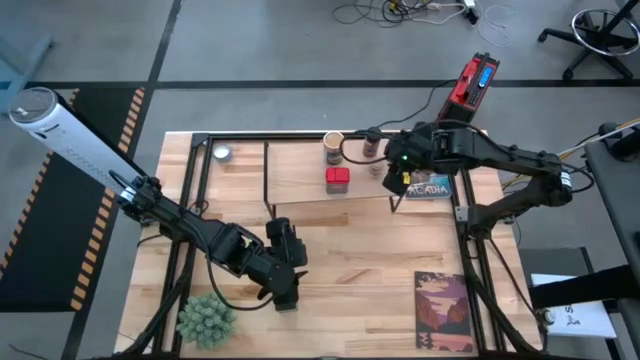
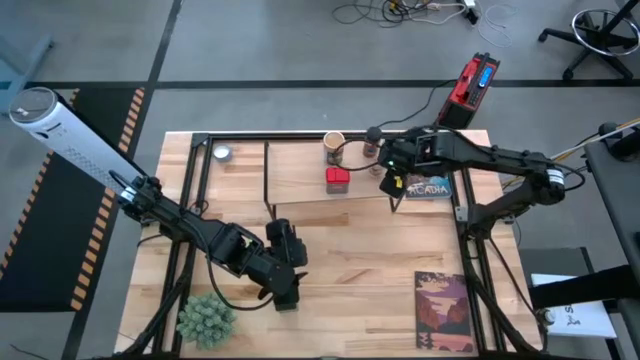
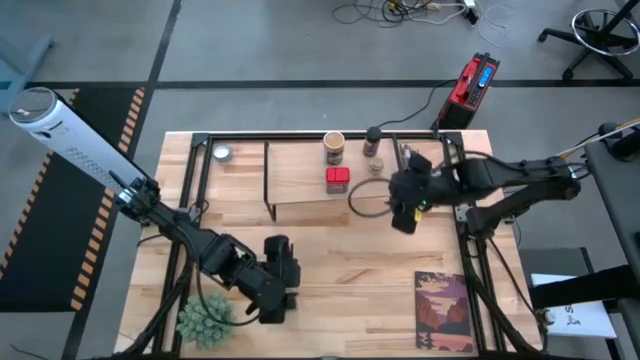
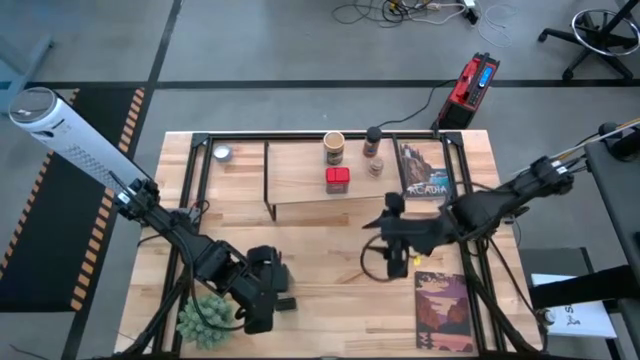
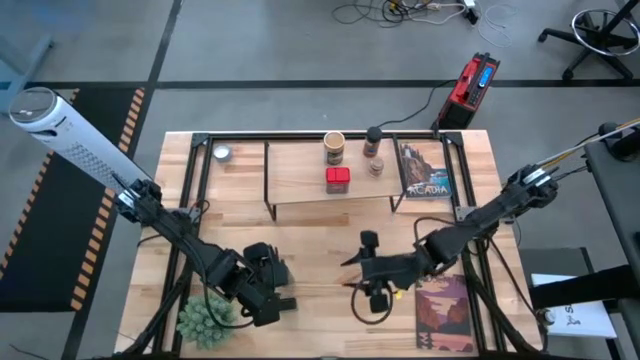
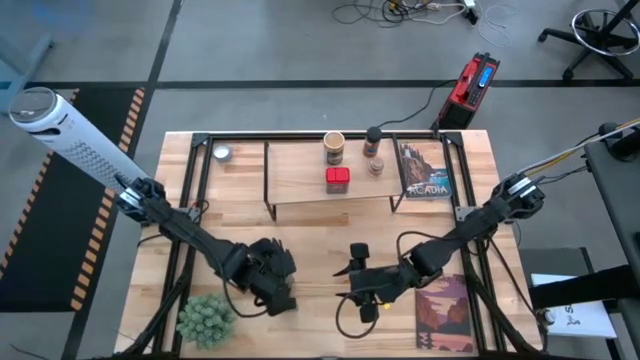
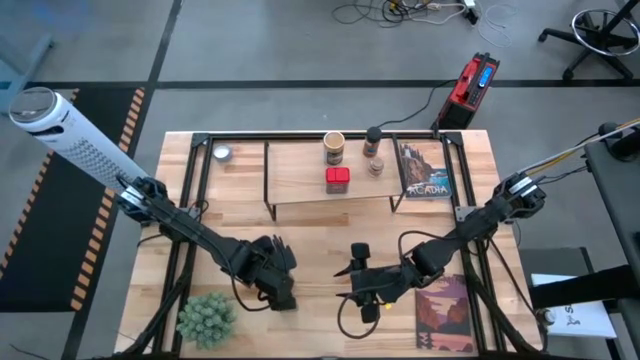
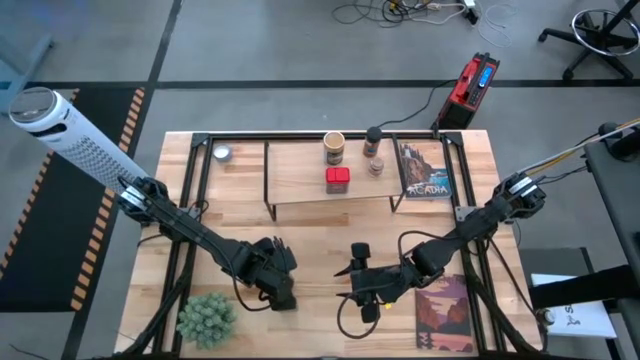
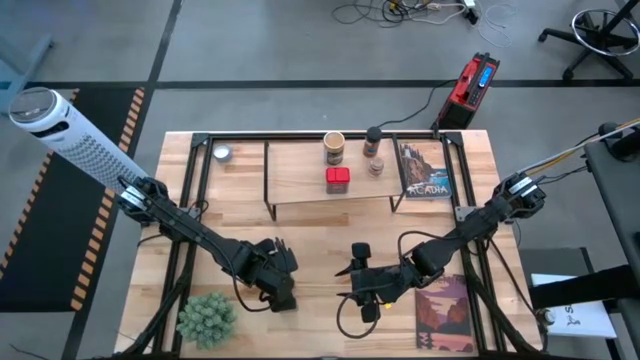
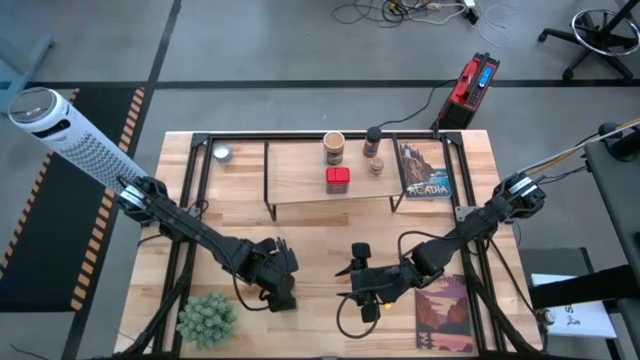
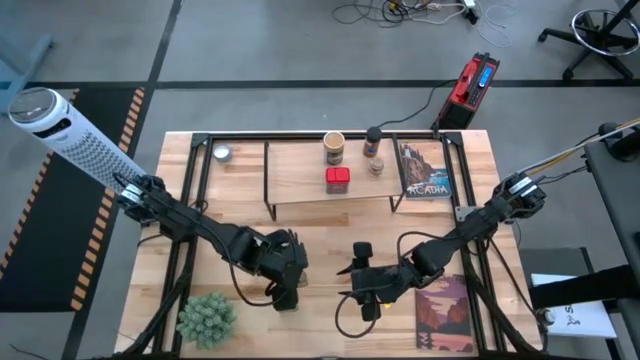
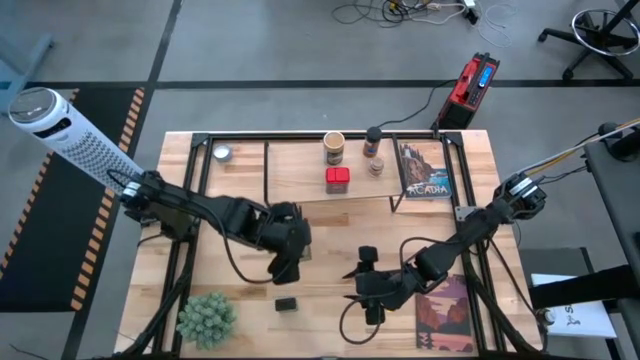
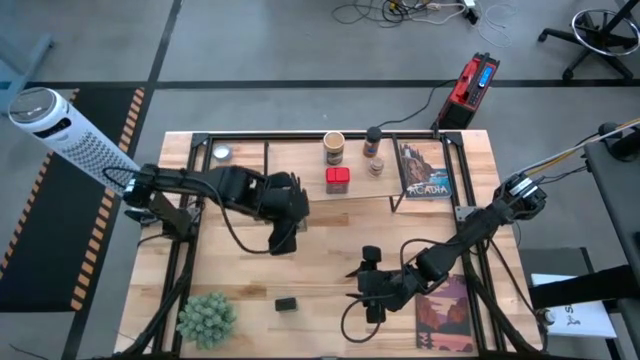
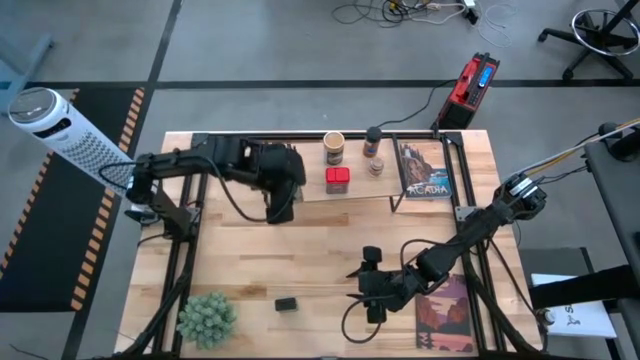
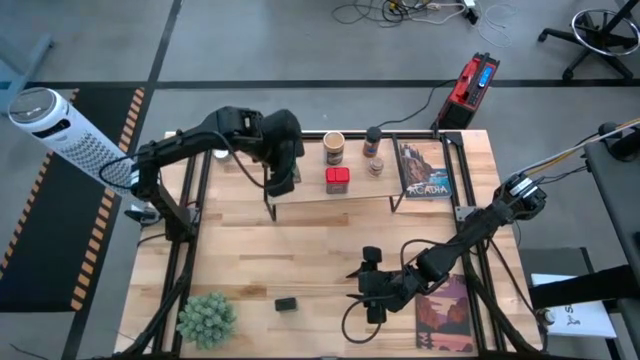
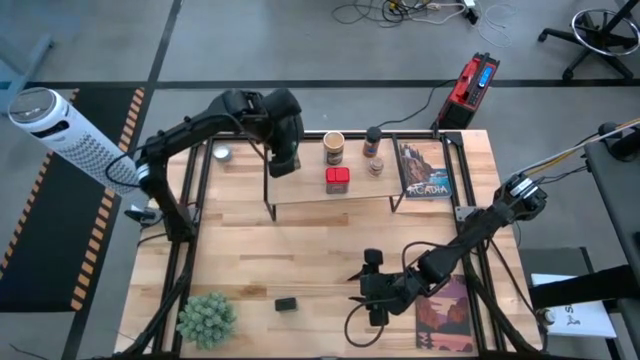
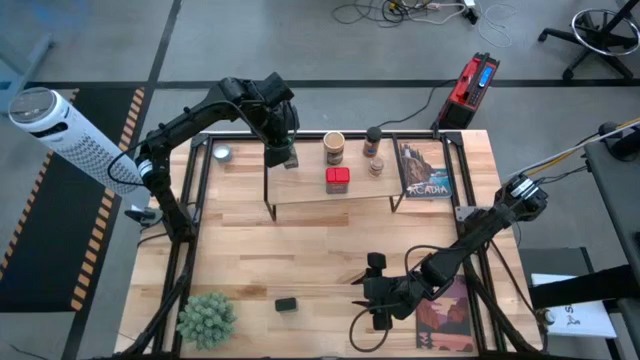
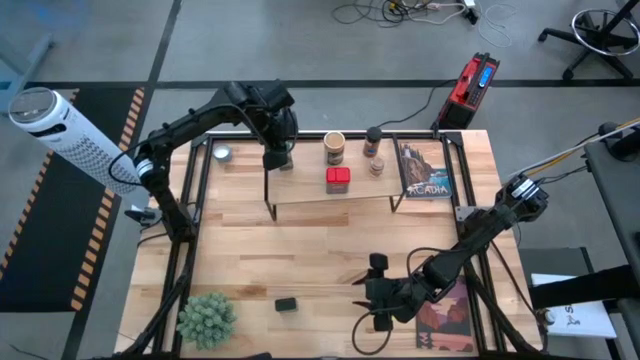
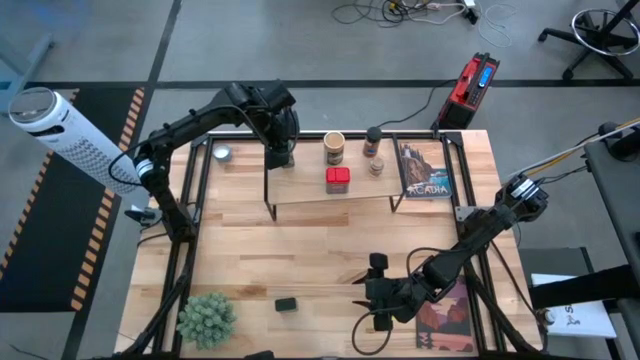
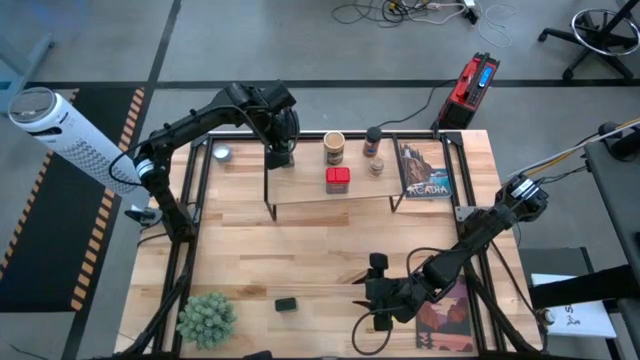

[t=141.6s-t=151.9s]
Task: Shelf spices
Put the green seasoning bottle on the shelf

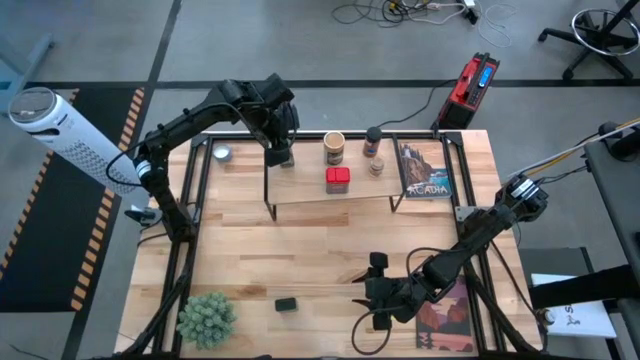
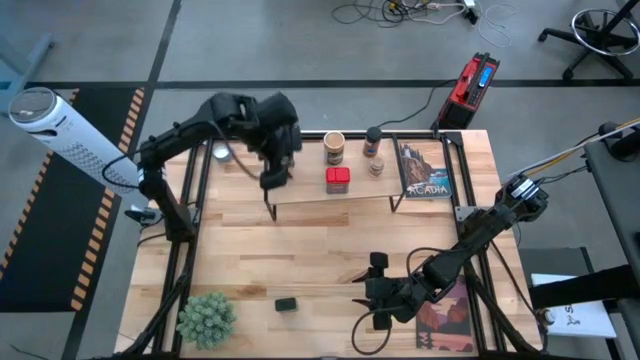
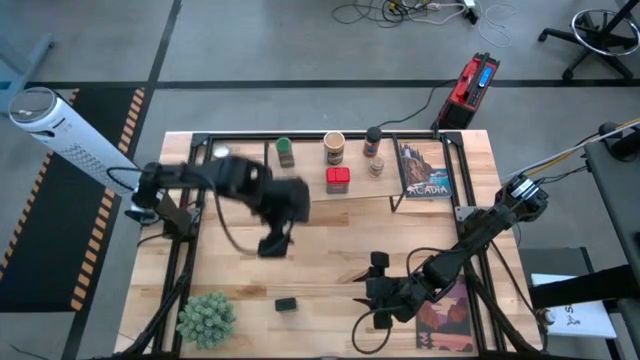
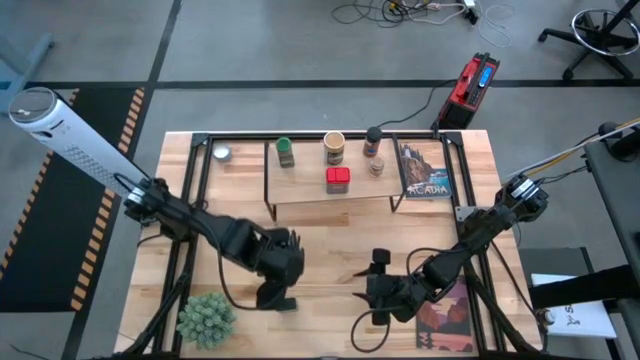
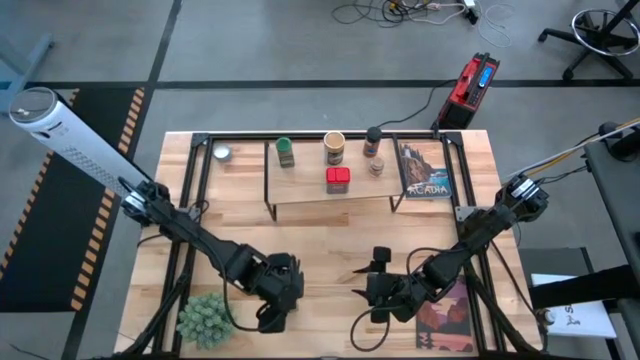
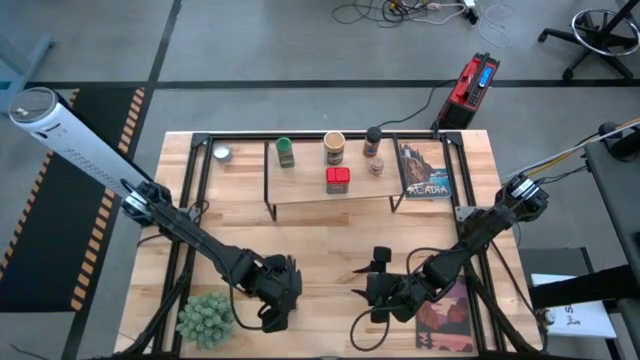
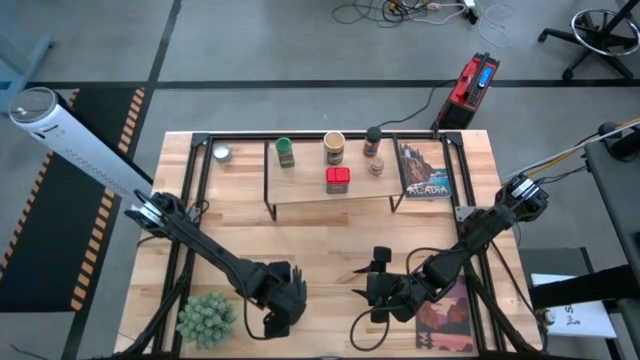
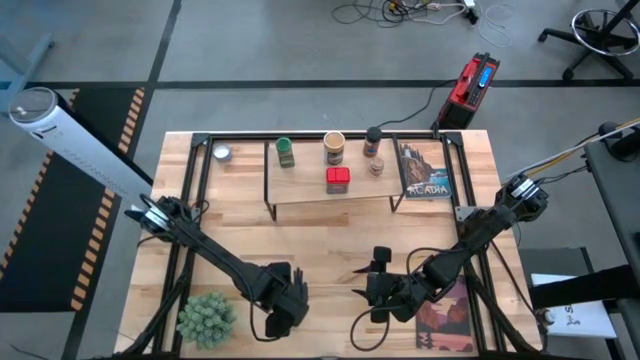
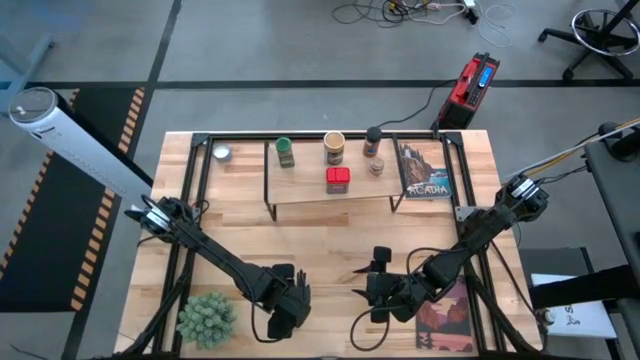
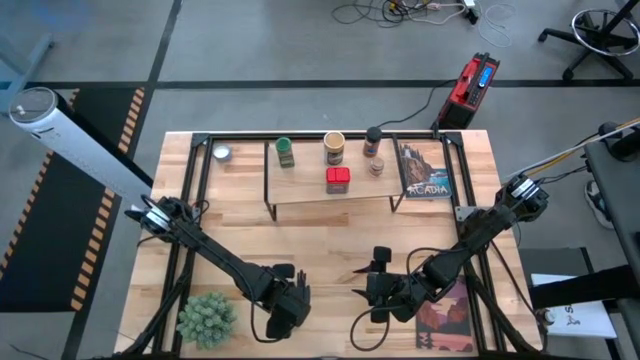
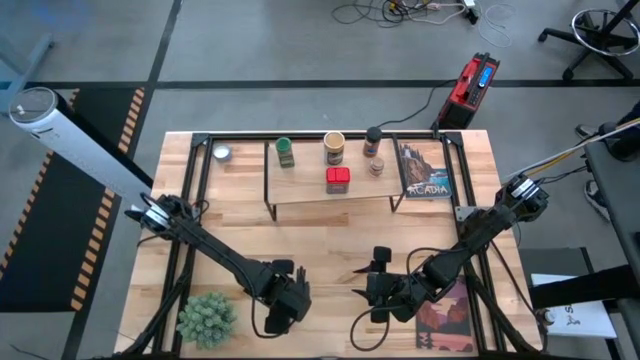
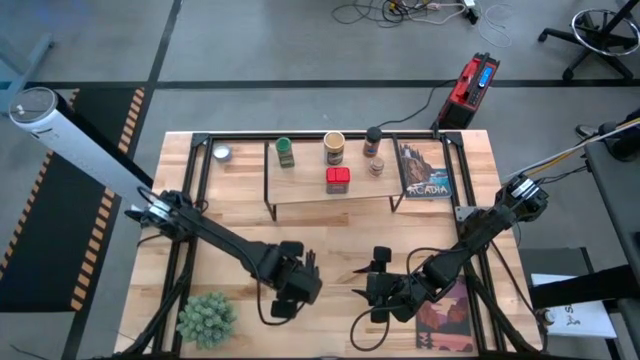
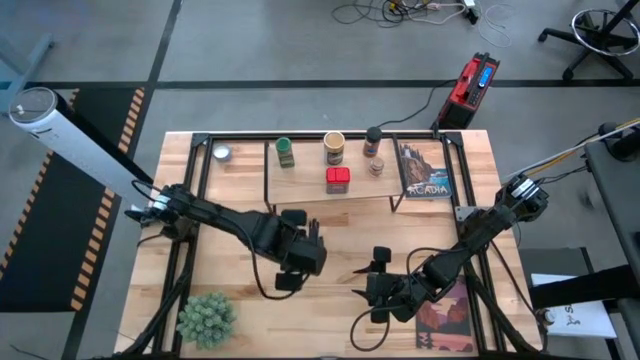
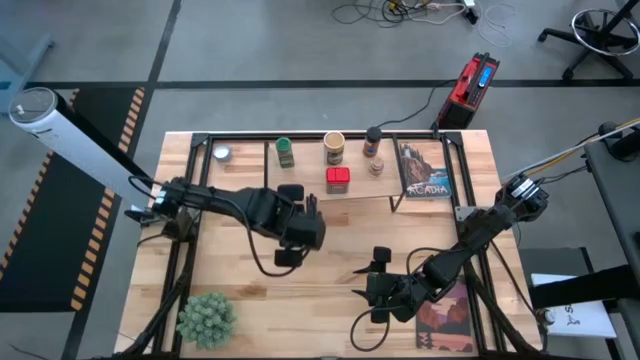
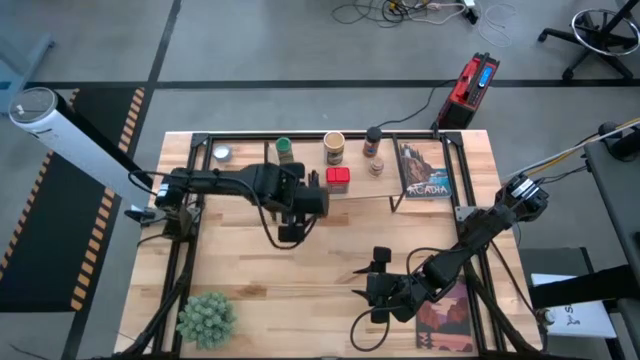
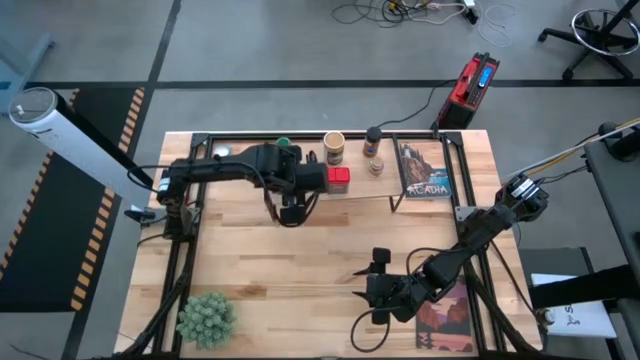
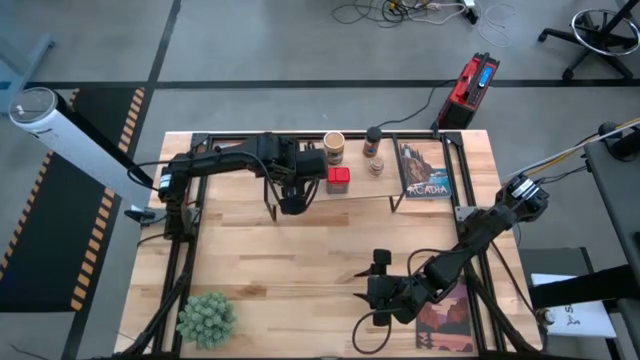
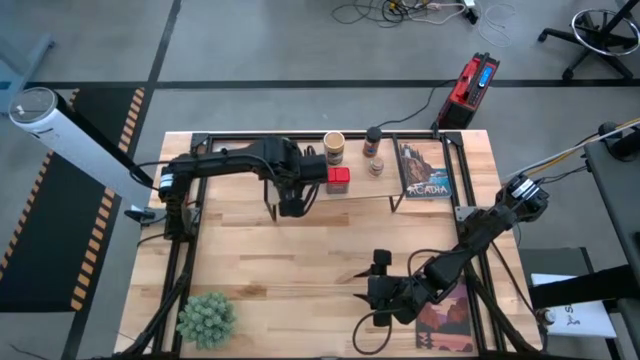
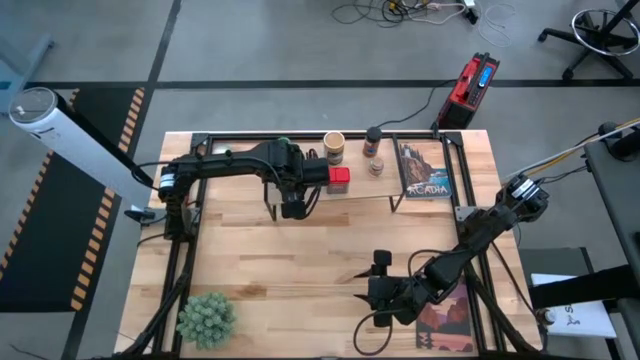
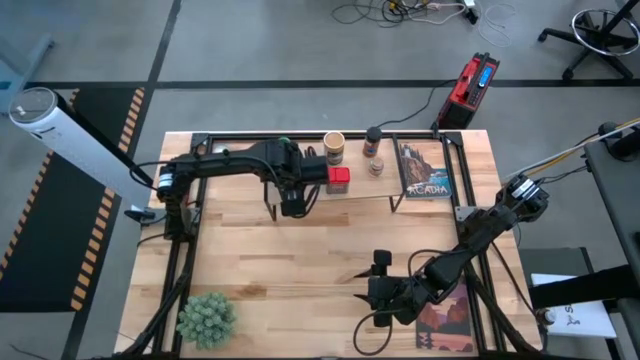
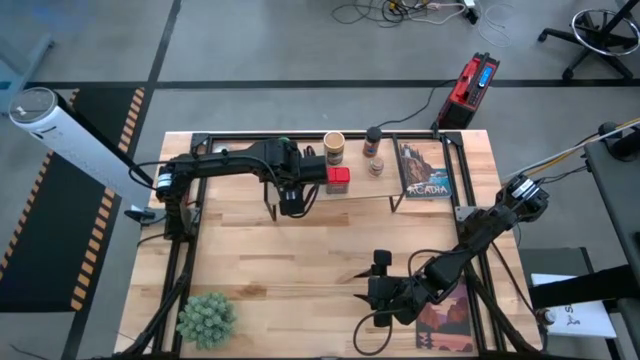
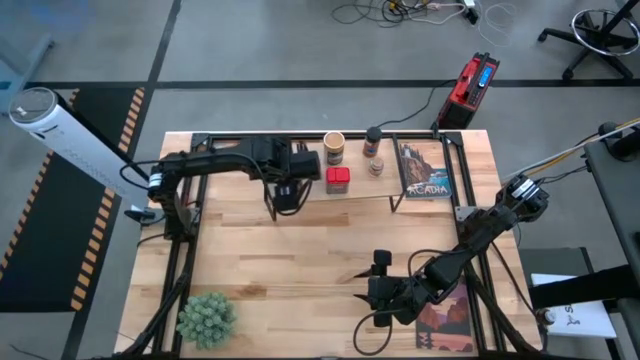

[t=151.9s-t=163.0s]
Put the black seasoning can on the shelf

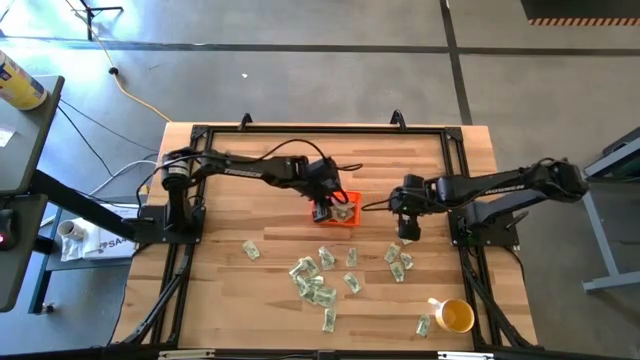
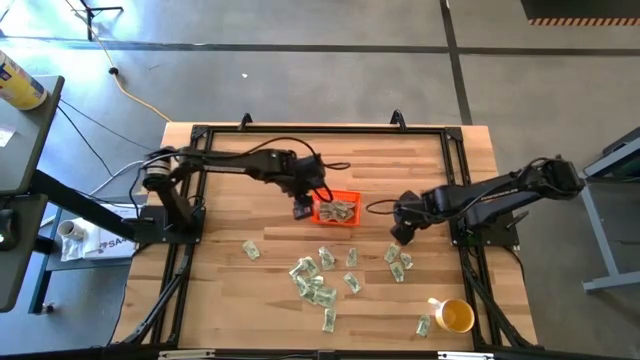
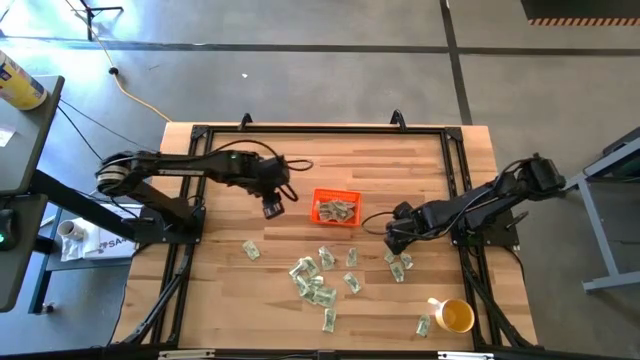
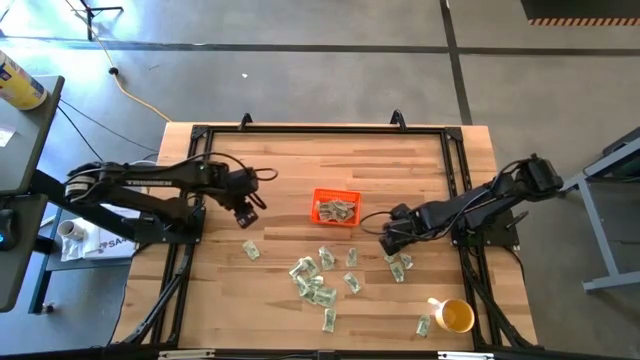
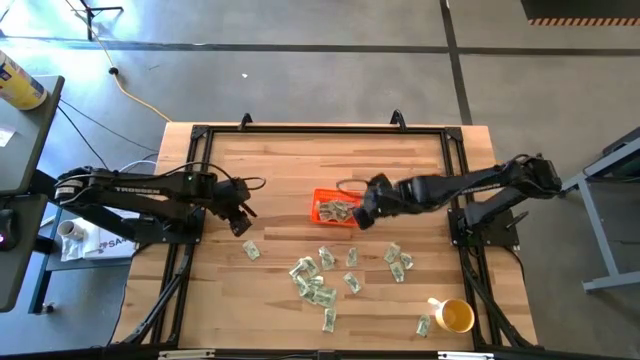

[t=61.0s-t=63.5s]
Task: Pick and place Stevia / Truvia into bins
Put the stevia packet into the orange bin
